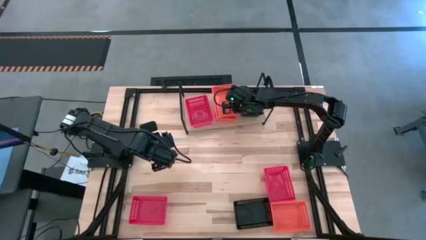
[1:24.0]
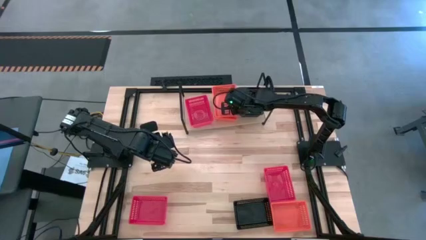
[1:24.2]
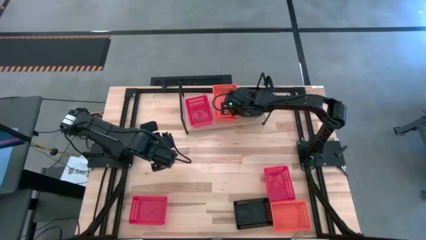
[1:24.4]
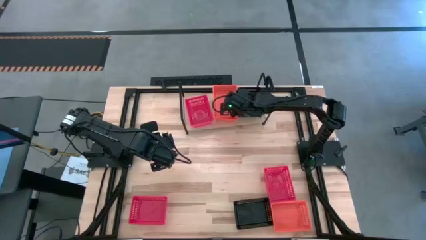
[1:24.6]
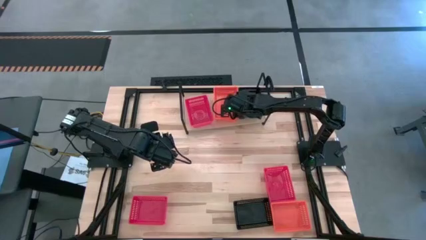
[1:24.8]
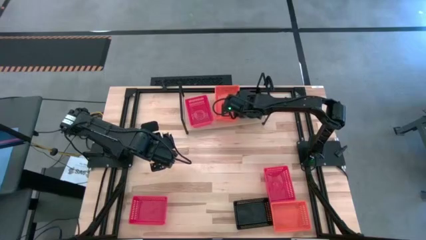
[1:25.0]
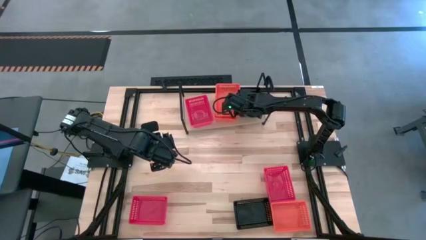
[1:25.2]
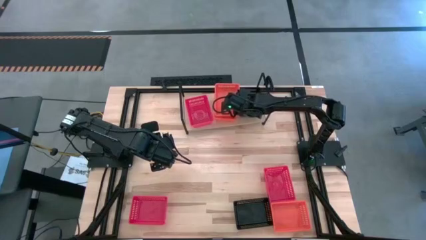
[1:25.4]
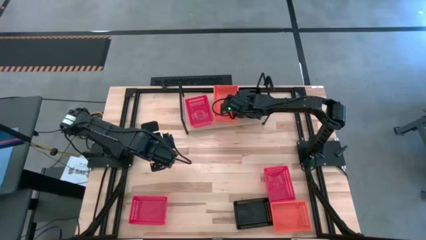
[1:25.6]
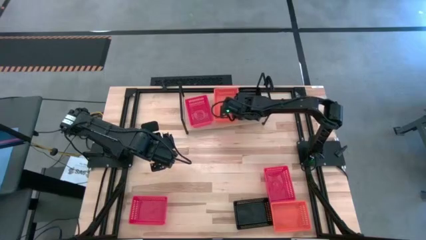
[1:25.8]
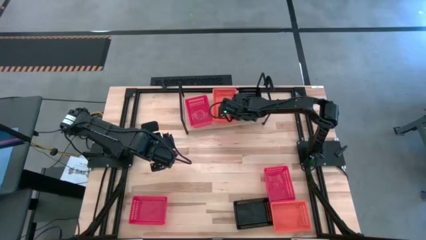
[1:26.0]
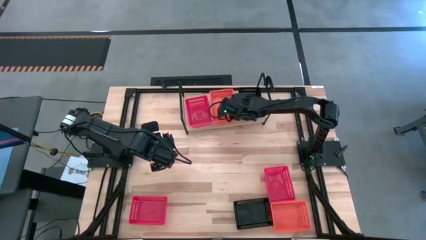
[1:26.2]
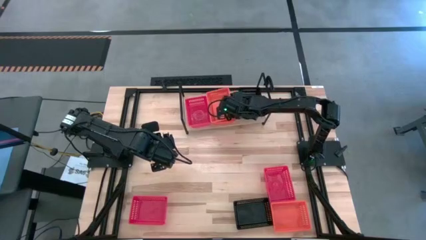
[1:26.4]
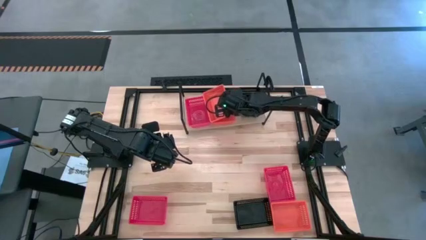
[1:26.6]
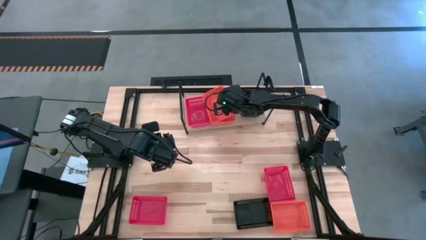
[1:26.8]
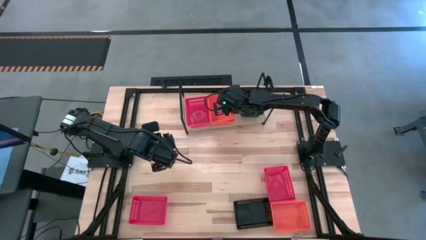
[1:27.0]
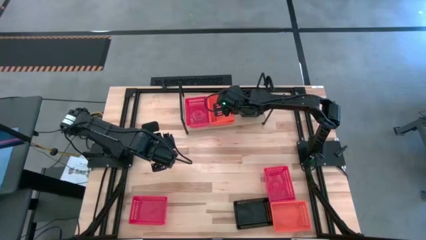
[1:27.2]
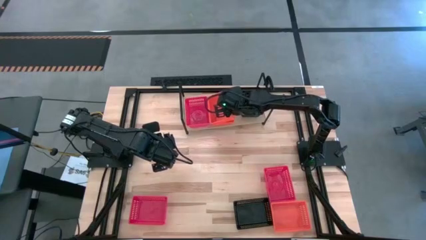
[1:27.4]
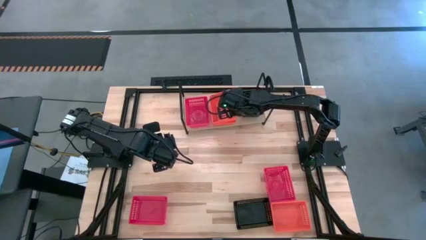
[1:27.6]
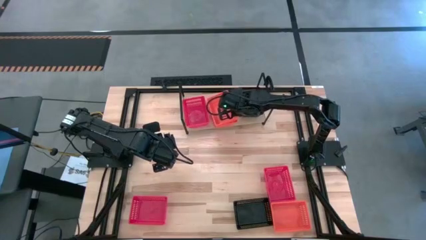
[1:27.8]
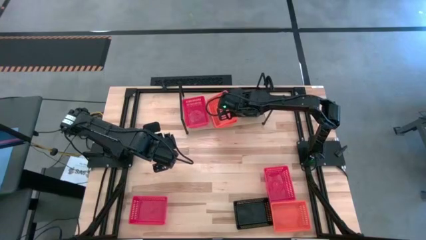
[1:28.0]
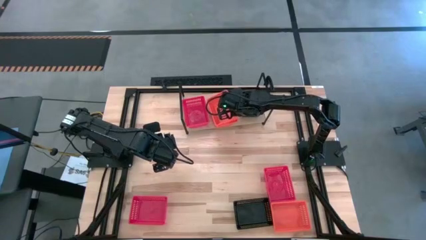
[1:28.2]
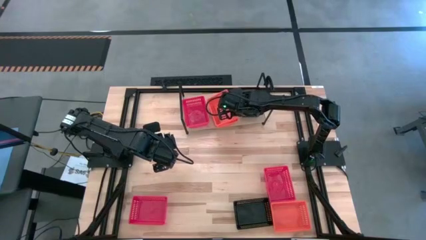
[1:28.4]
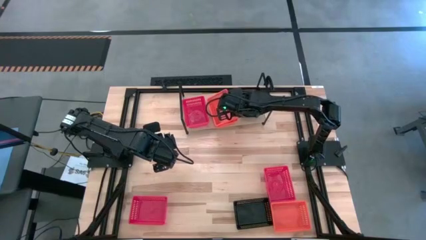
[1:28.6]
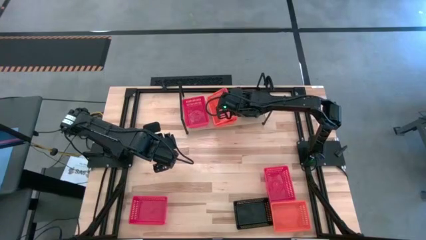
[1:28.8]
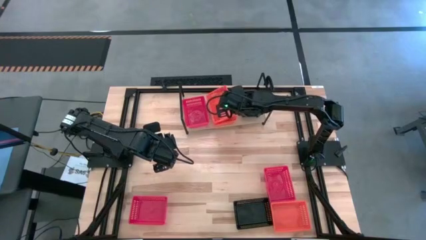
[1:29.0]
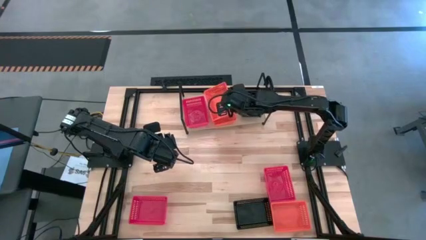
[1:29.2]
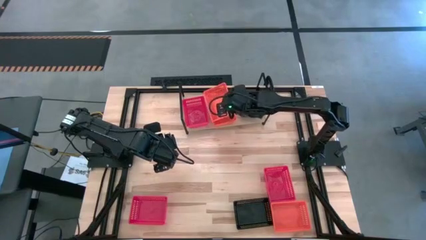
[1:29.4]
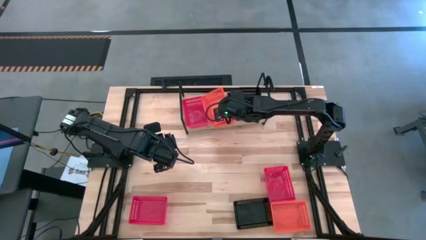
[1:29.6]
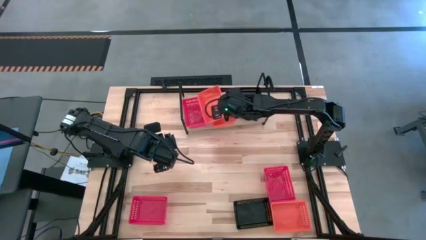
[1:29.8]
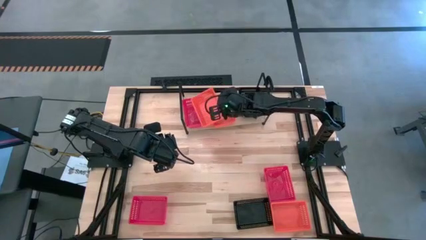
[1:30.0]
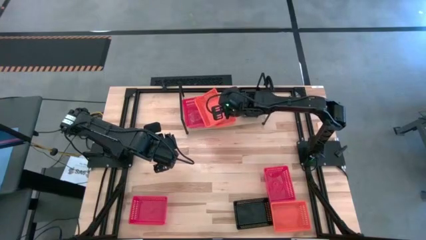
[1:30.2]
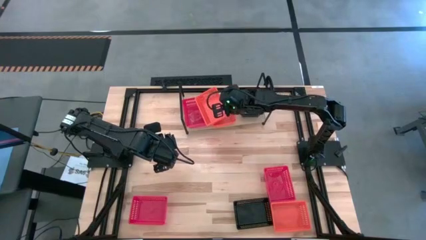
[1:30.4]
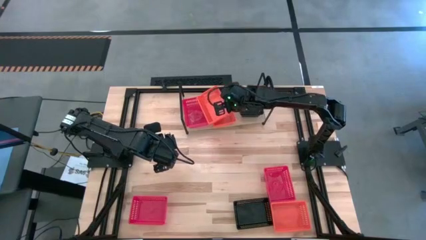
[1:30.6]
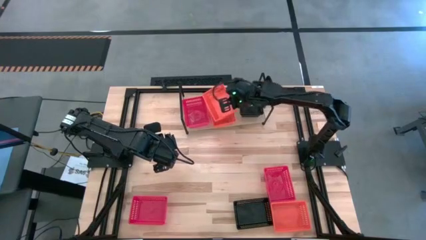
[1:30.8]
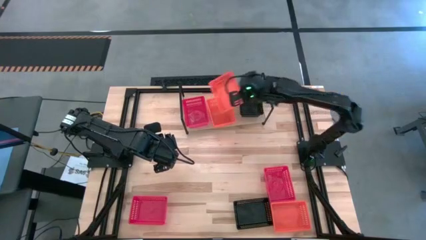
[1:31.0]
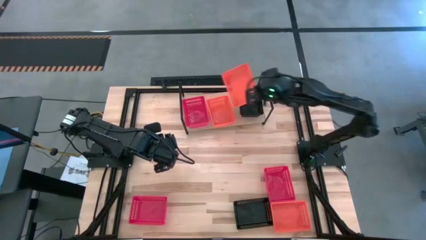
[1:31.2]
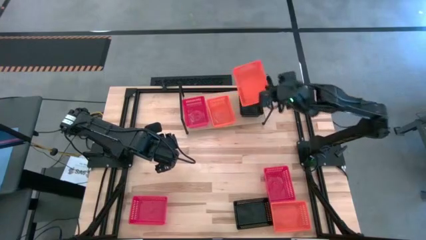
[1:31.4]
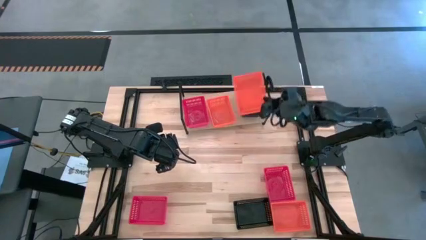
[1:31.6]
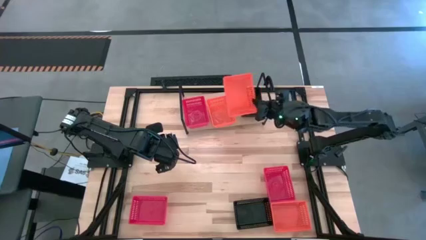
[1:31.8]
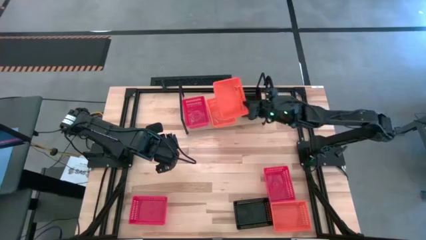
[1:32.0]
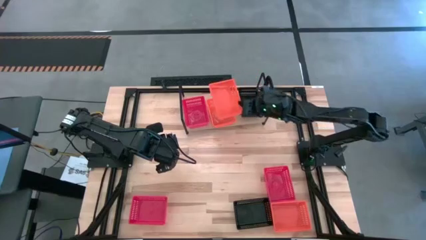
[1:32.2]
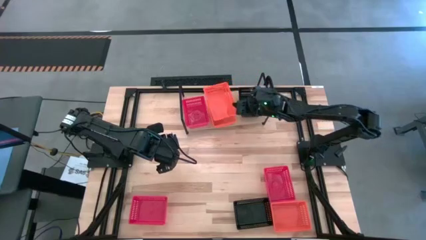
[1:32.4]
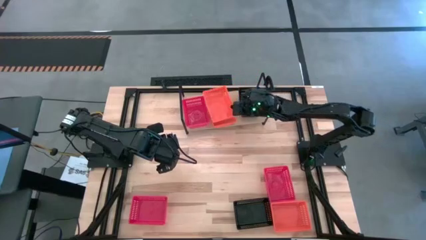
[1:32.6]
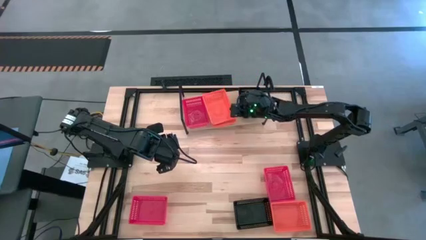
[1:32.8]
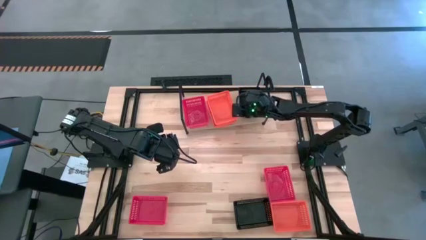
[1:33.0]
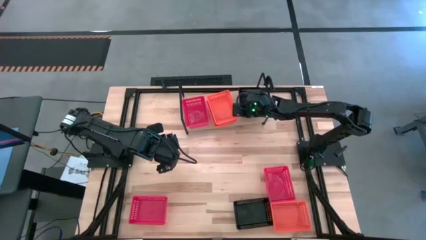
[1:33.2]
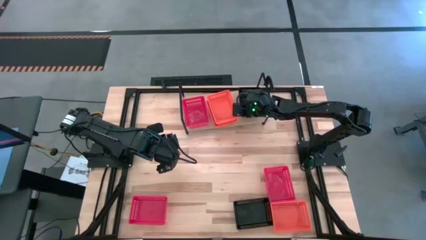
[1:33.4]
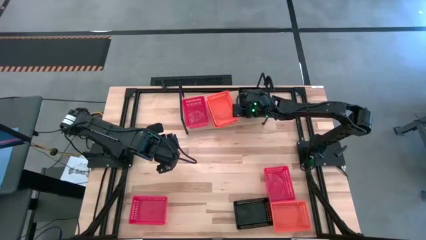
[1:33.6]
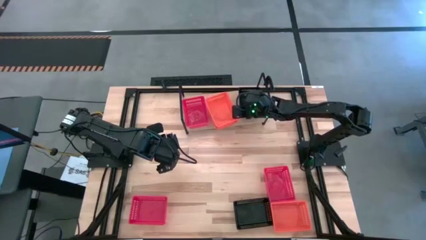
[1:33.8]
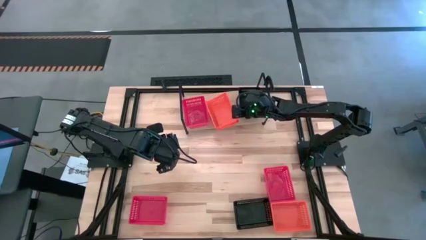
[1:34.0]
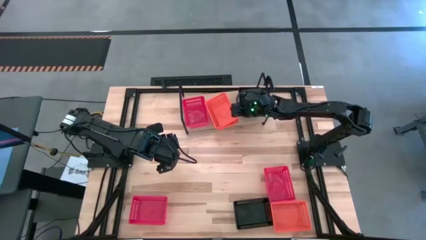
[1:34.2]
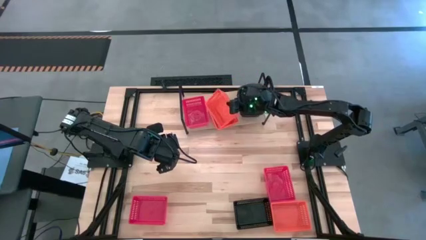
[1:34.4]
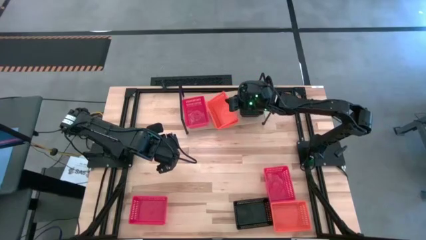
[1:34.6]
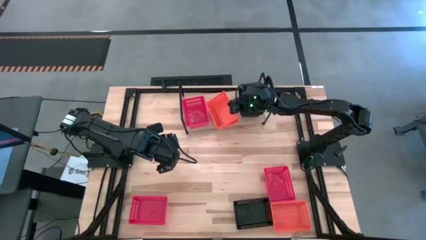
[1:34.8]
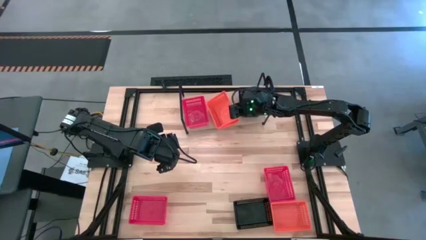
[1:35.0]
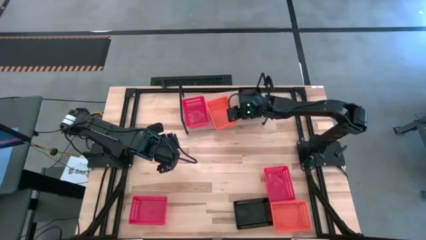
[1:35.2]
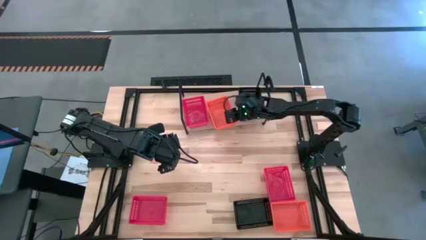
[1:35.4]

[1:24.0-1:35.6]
Task: Stack baskets on shelf by color
Stack the left orange bin into the orange bin on the shelf
